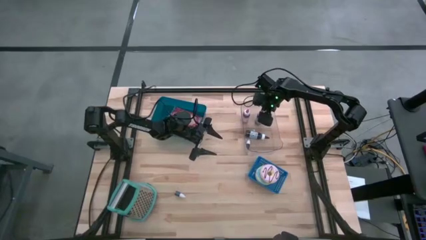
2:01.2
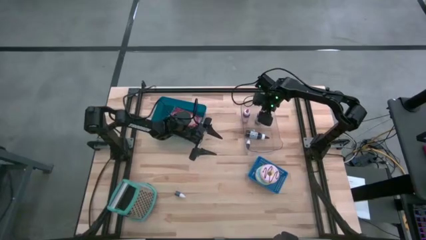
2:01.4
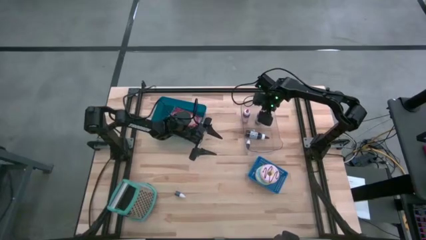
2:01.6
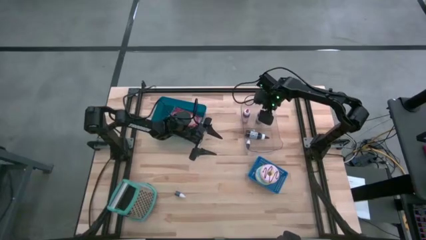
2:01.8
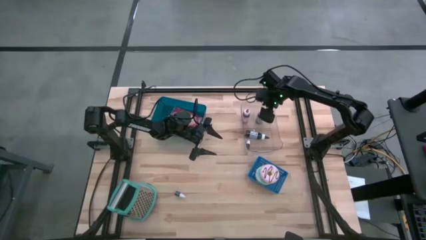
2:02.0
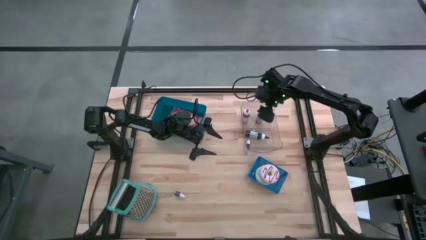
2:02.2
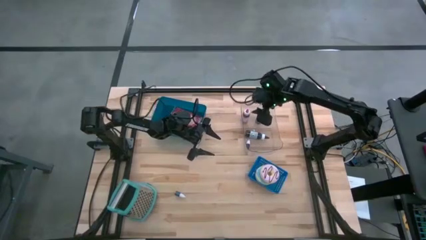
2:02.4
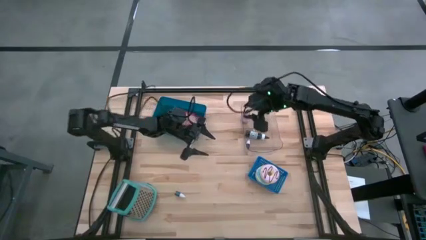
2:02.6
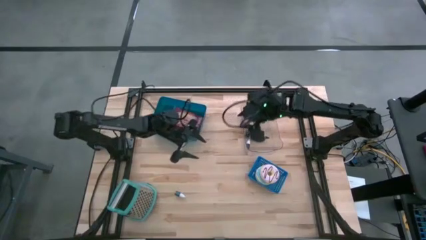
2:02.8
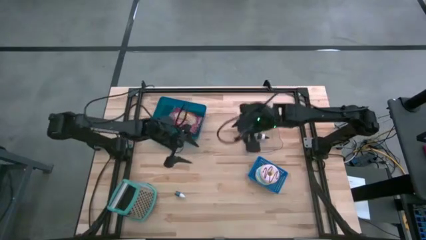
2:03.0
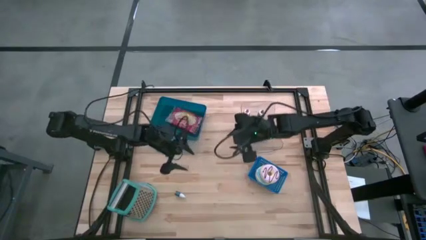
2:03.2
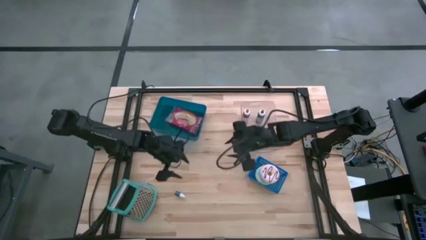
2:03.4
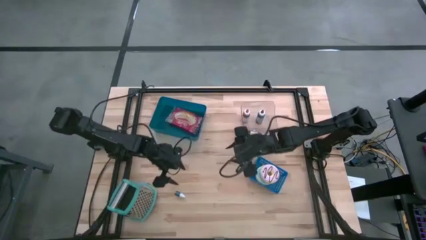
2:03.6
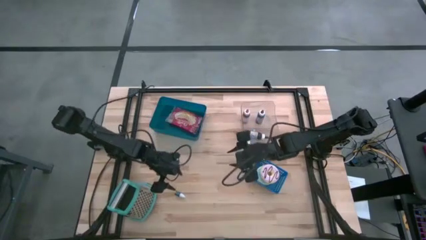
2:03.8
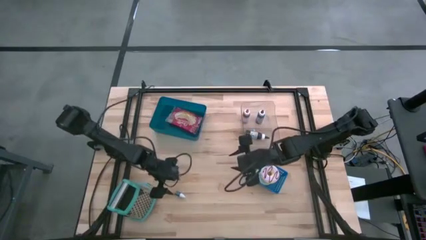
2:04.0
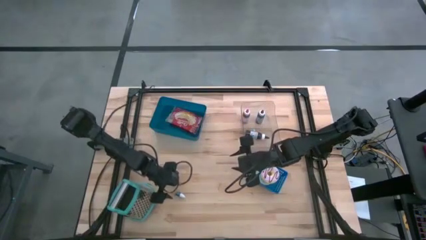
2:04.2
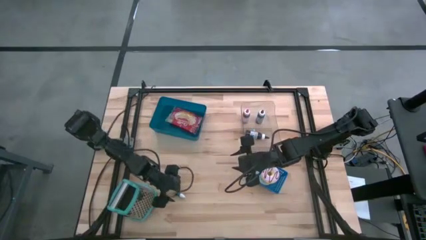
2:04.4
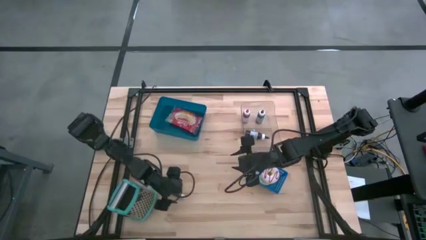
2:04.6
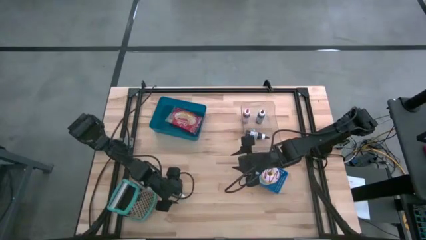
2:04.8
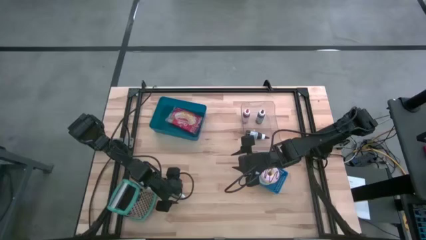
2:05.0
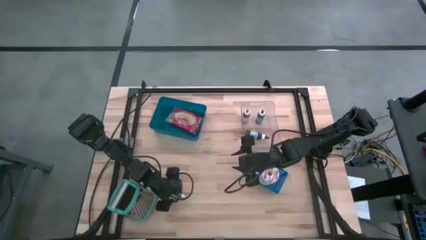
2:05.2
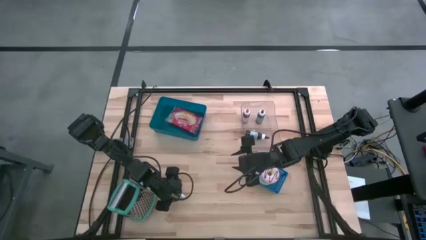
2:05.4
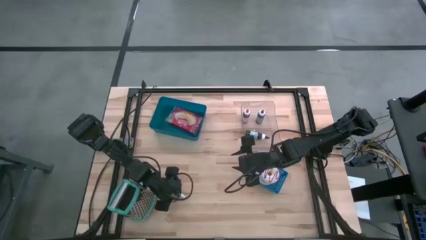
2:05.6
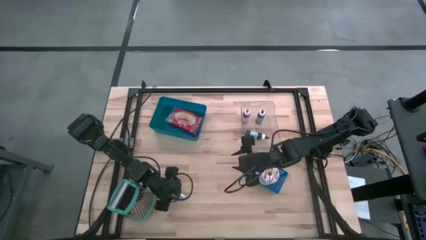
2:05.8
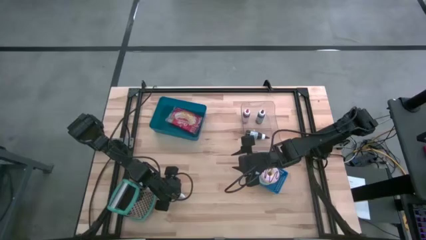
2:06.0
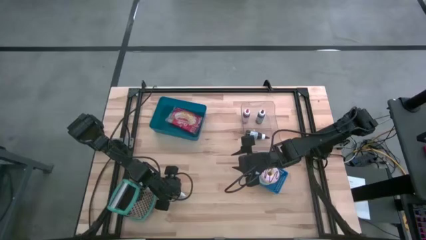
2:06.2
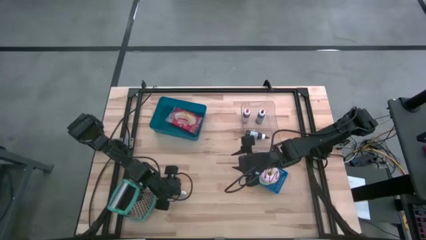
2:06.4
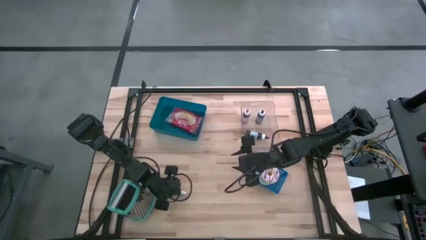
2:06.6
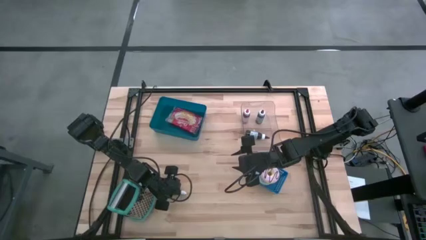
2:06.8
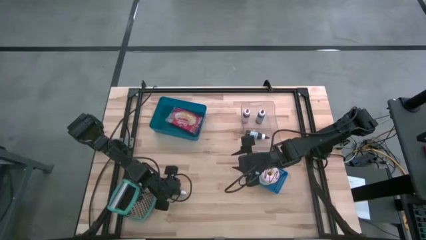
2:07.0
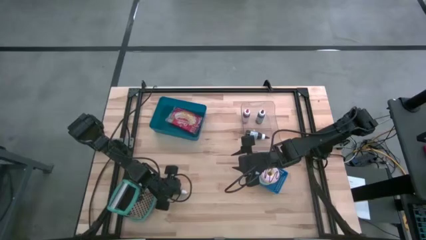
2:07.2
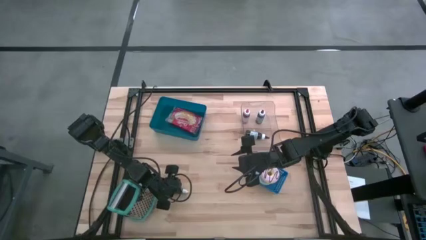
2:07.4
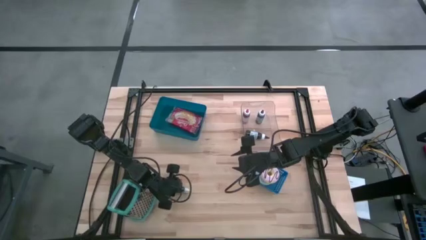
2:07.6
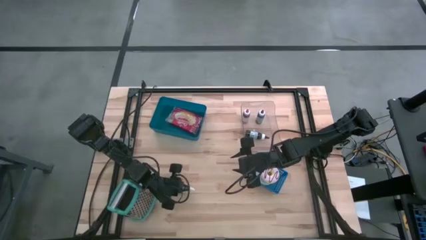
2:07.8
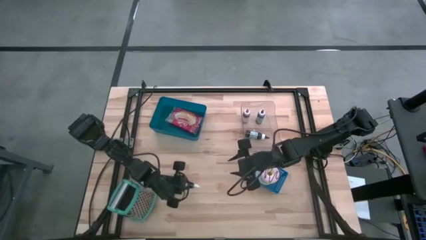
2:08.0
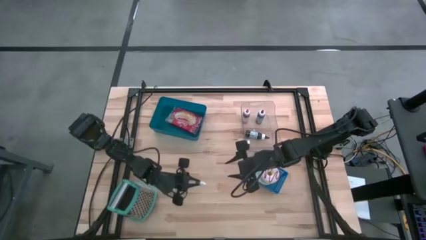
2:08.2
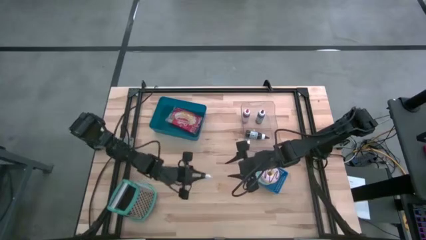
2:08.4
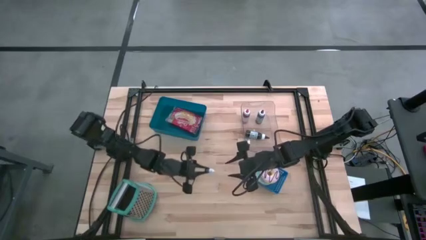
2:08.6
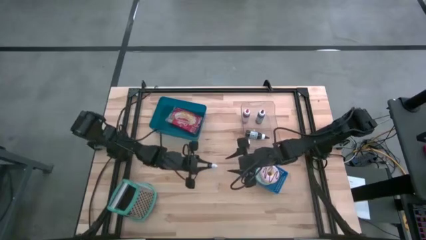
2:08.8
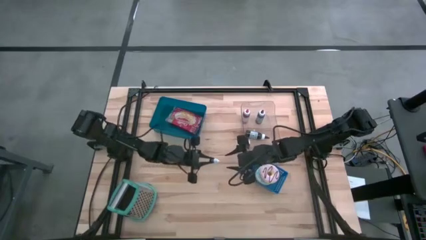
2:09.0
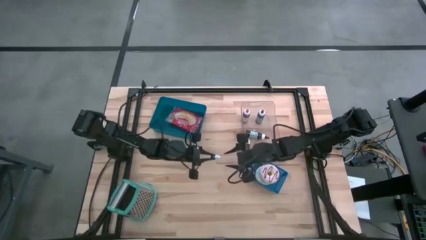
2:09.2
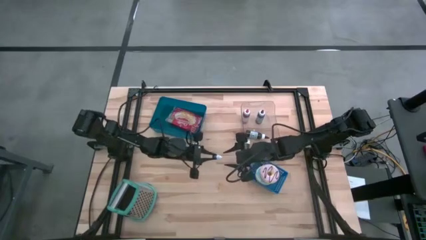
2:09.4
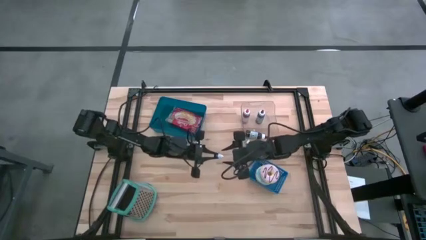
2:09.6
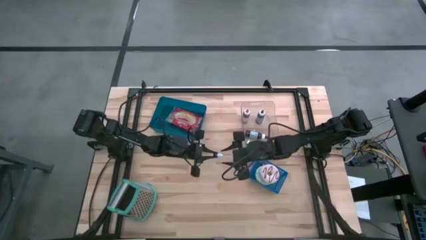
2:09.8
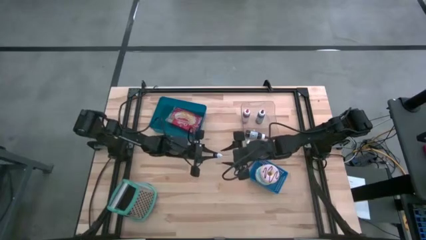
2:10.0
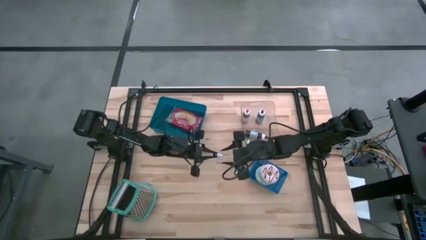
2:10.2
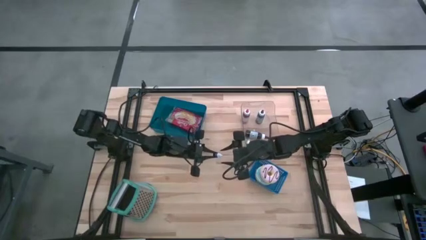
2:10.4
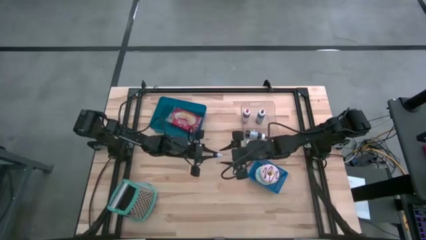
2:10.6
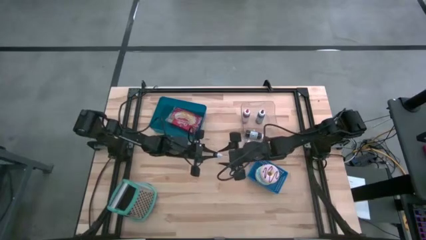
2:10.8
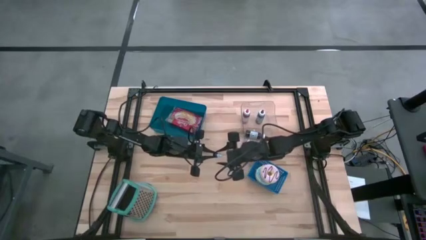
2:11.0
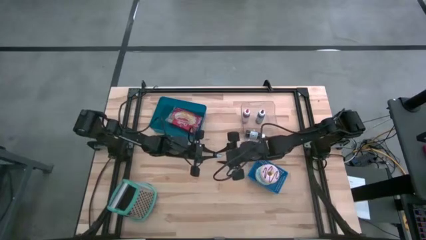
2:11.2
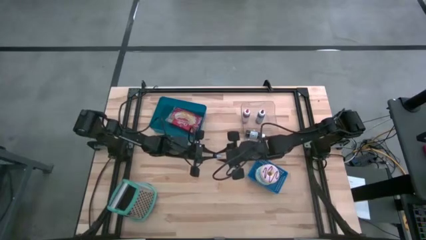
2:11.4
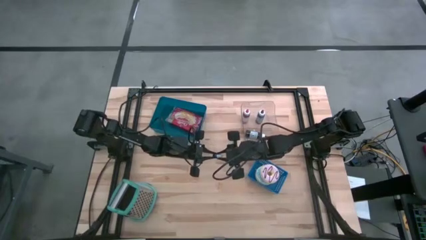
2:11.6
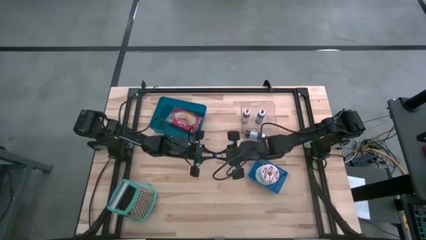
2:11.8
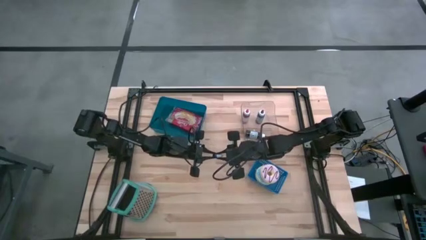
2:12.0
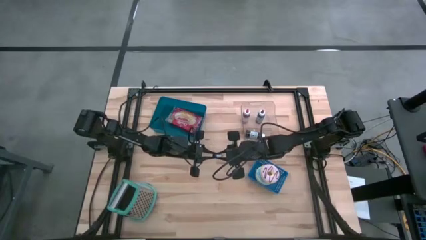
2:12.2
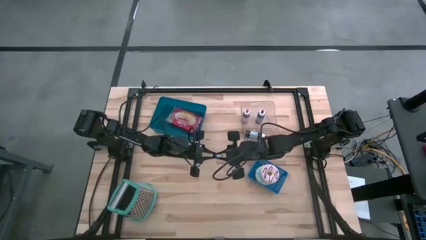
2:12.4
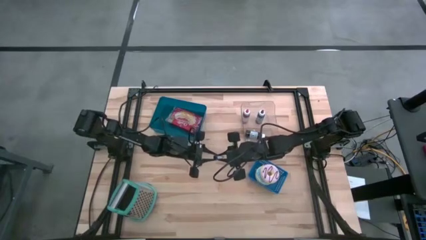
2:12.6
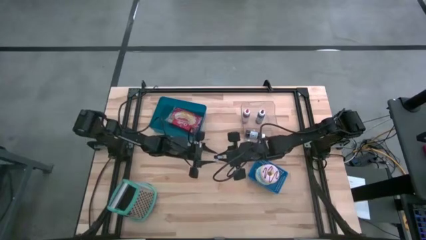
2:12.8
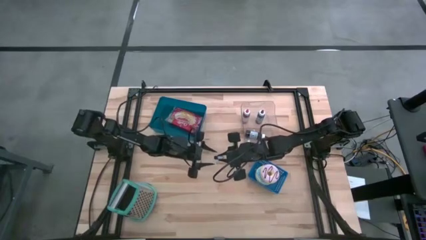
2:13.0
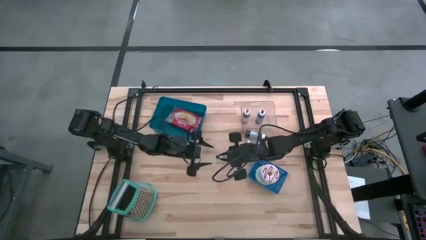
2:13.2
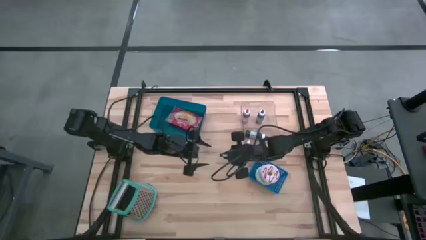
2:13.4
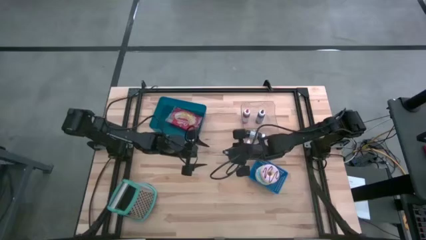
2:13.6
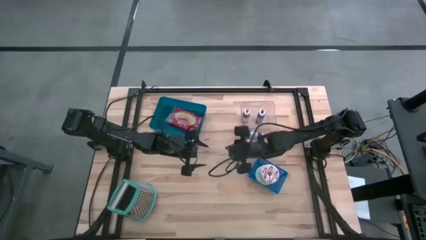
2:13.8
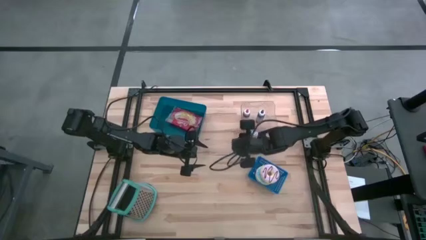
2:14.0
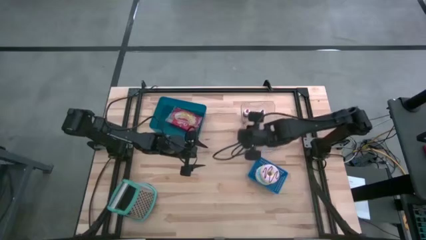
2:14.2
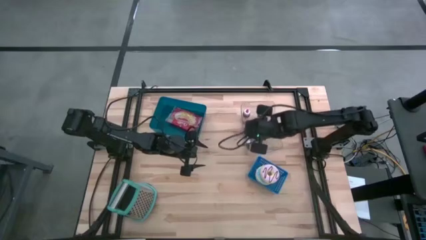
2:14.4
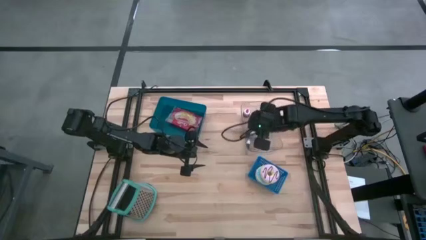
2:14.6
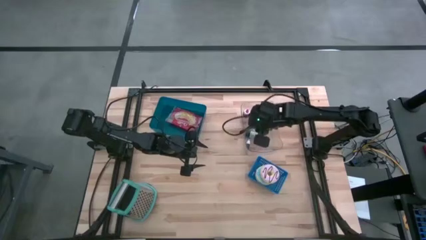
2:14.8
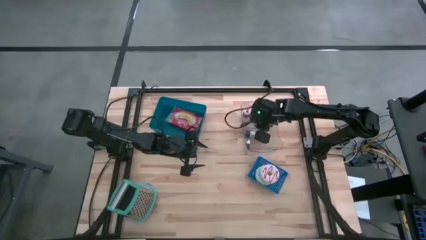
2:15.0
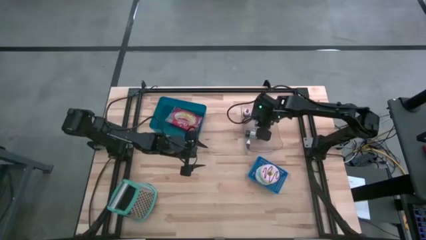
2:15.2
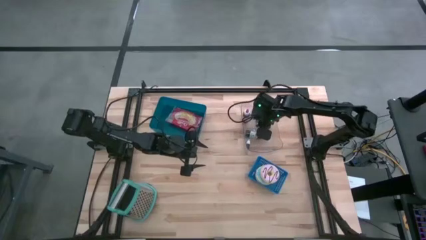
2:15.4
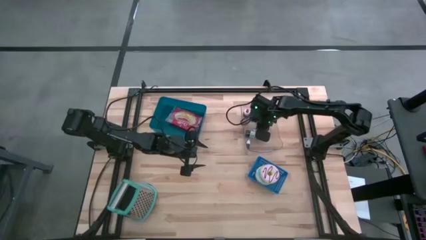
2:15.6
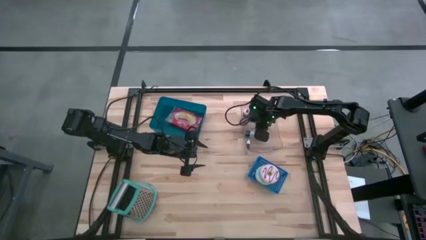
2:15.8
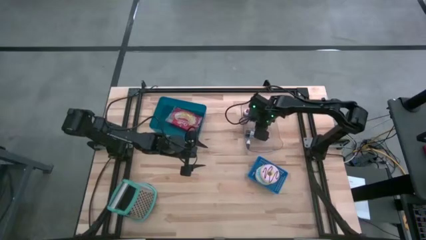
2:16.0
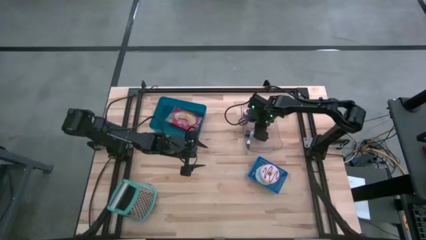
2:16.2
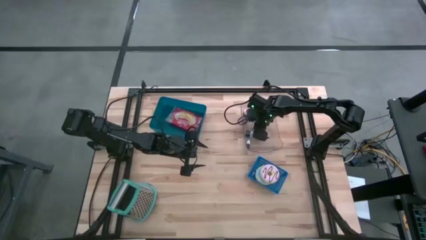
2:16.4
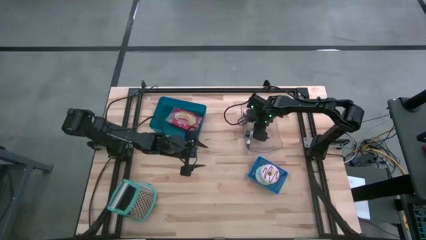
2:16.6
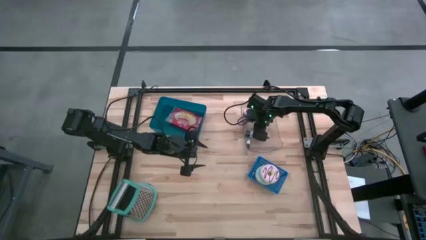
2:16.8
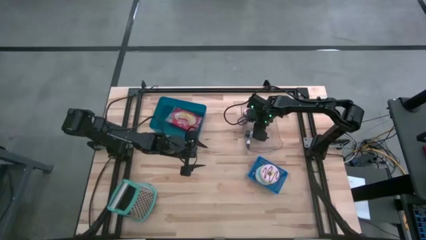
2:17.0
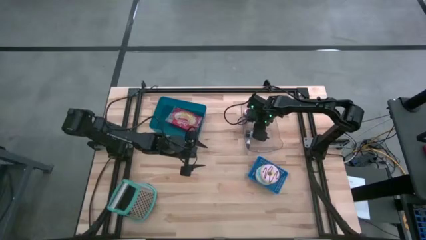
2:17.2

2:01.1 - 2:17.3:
Task: Pick & Place Food Item
Put the small purple food coloring bottle into the transparent bin

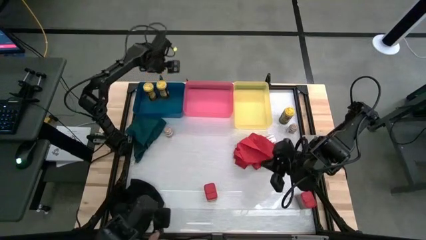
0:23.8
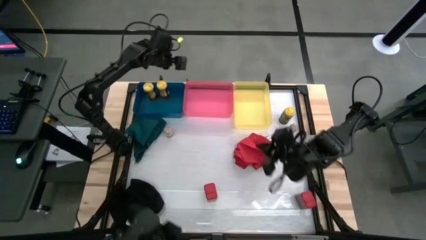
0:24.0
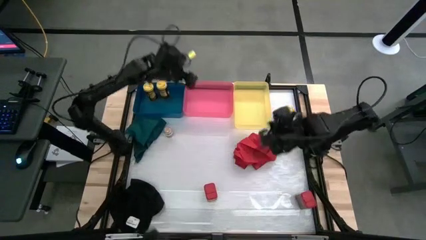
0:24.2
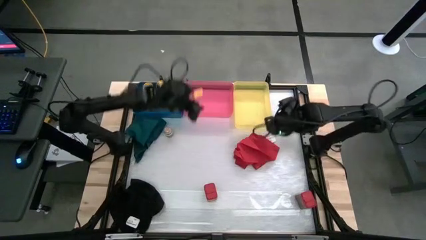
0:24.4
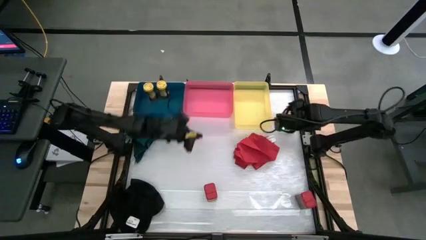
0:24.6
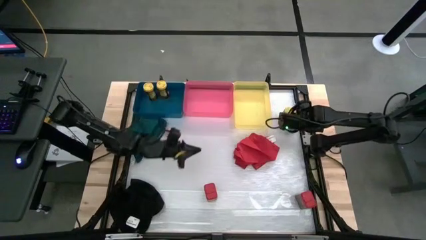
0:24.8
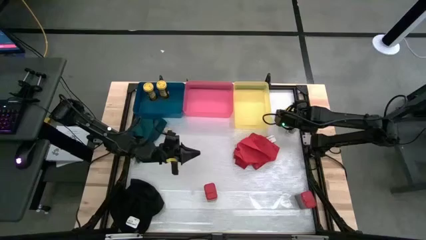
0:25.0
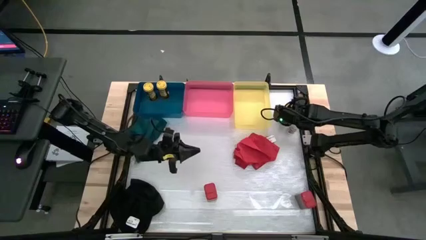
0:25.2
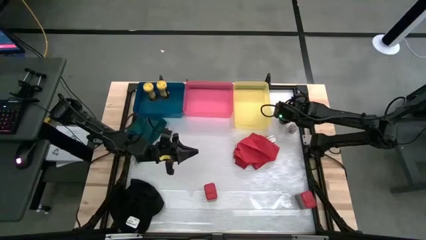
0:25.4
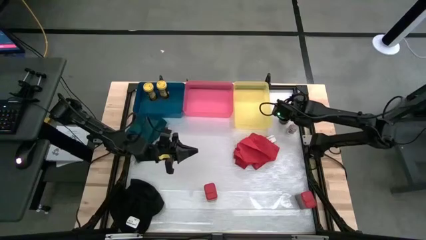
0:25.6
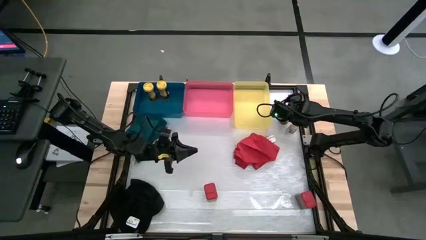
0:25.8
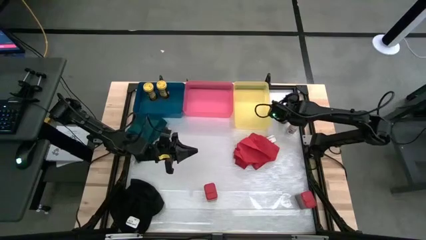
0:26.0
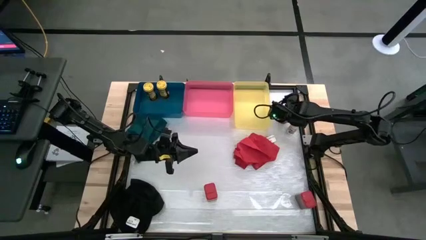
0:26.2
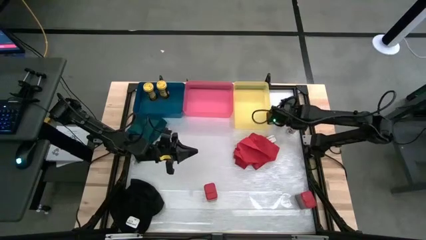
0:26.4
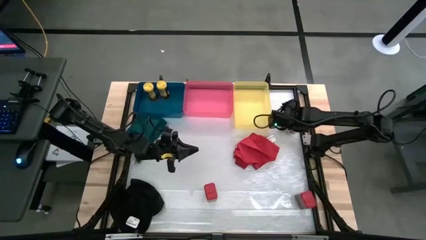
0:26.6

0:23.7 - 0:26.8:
Task: Sort spices by type
Put the yellow seasoning bottle into the blue bin
